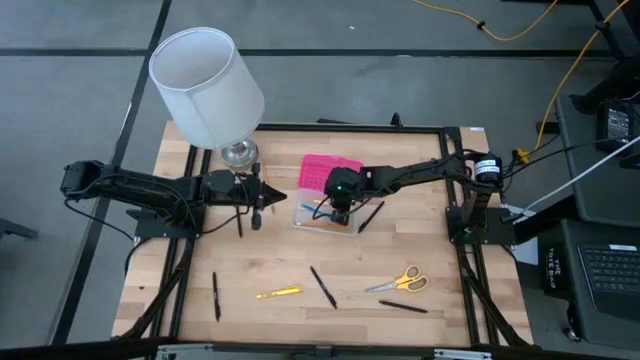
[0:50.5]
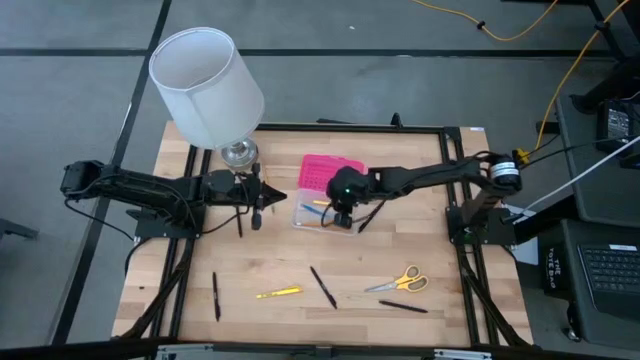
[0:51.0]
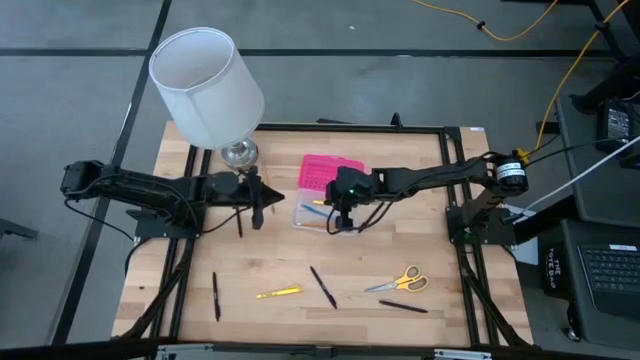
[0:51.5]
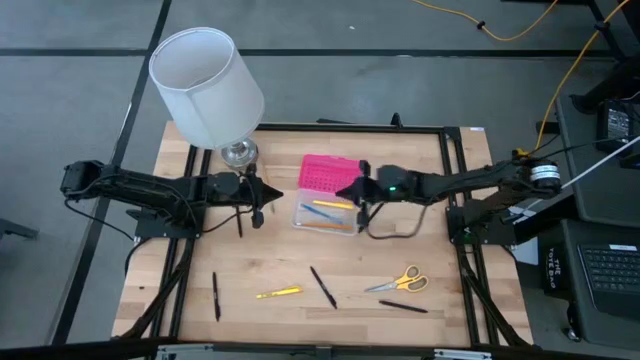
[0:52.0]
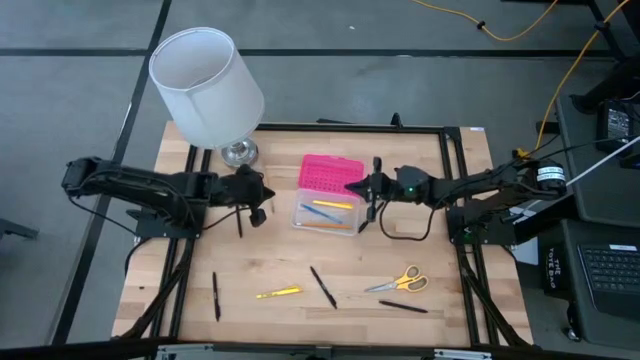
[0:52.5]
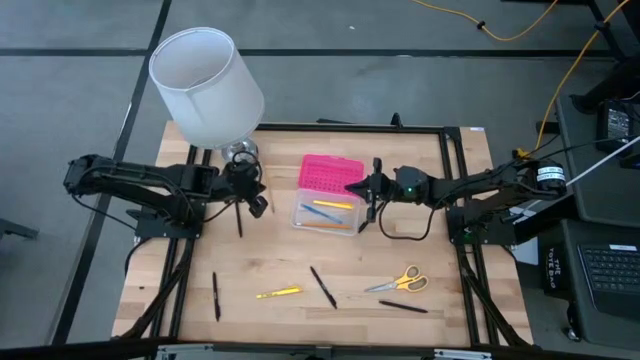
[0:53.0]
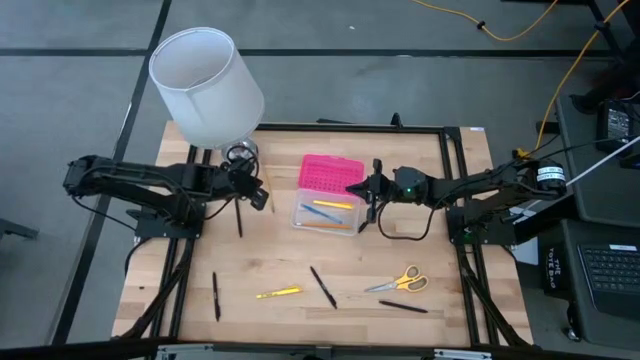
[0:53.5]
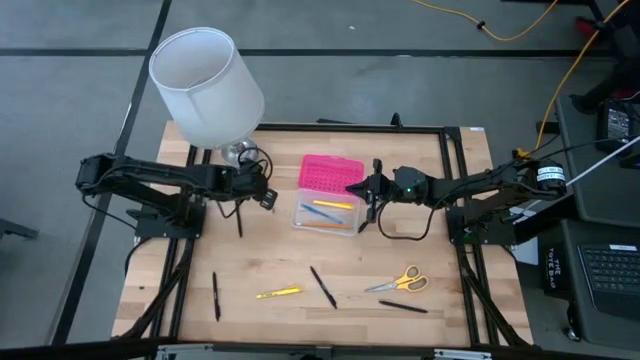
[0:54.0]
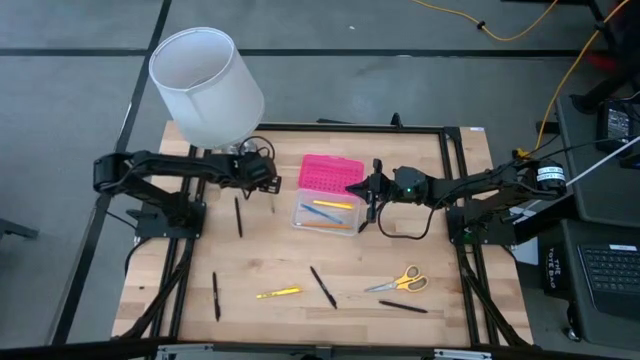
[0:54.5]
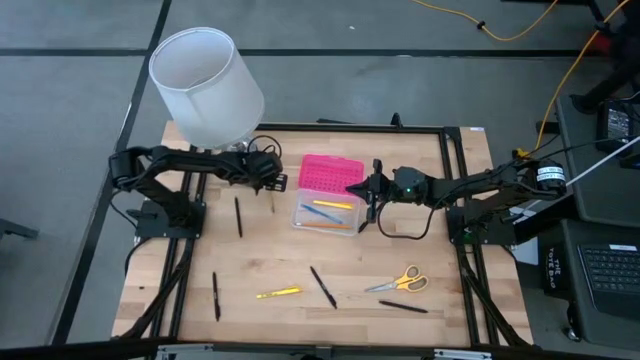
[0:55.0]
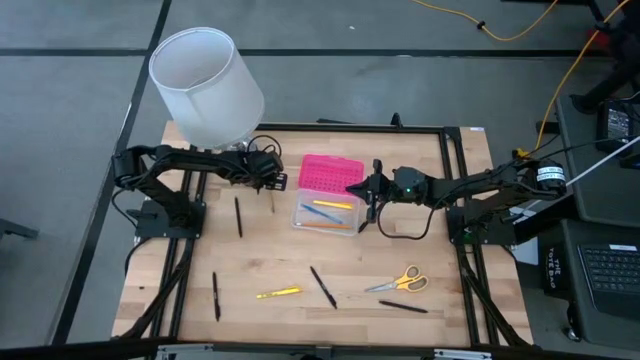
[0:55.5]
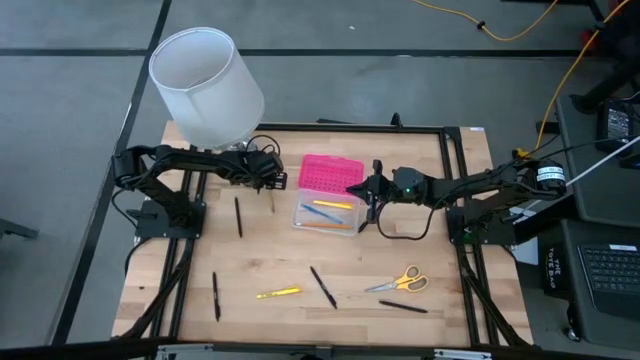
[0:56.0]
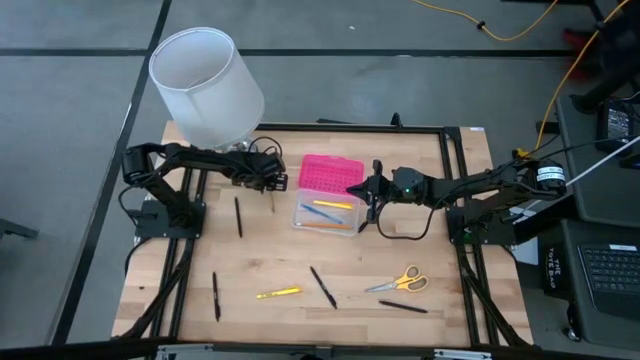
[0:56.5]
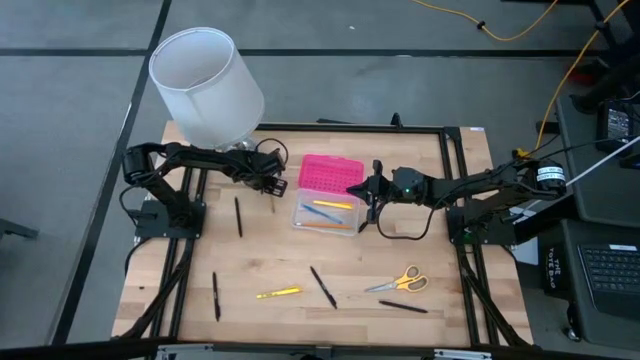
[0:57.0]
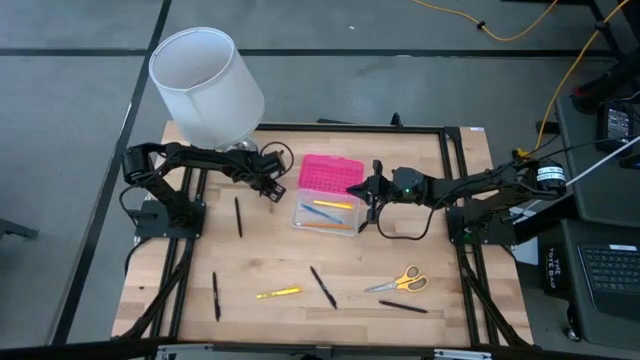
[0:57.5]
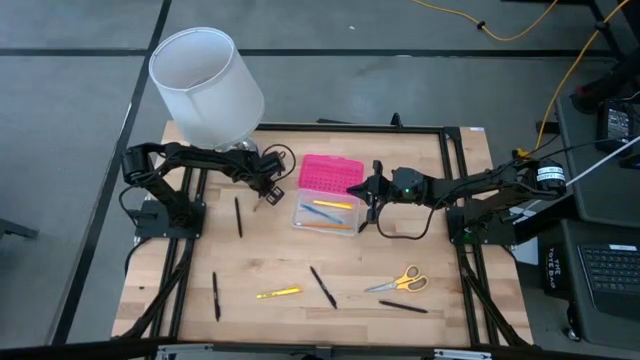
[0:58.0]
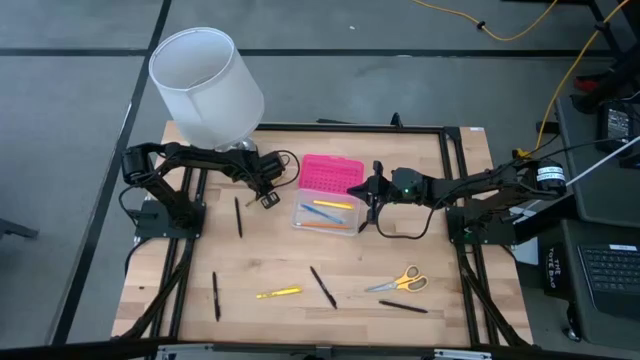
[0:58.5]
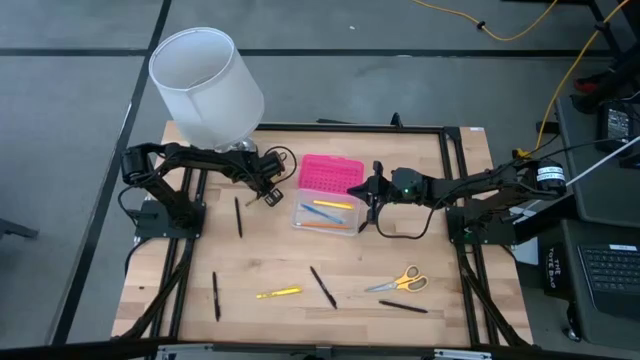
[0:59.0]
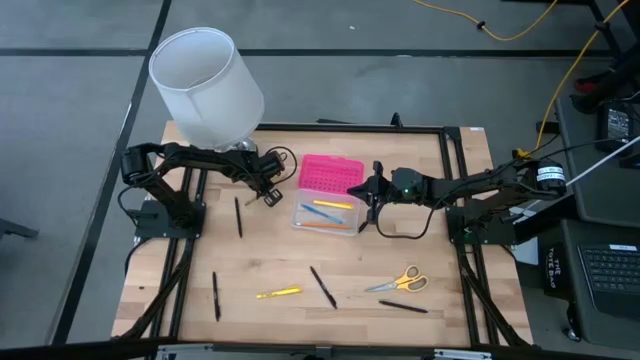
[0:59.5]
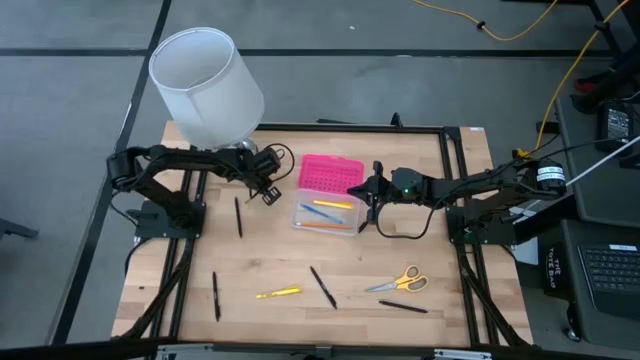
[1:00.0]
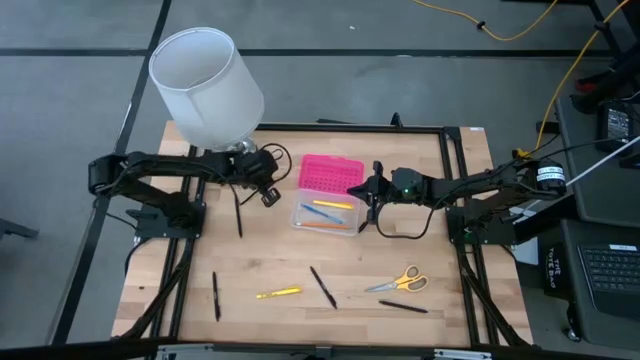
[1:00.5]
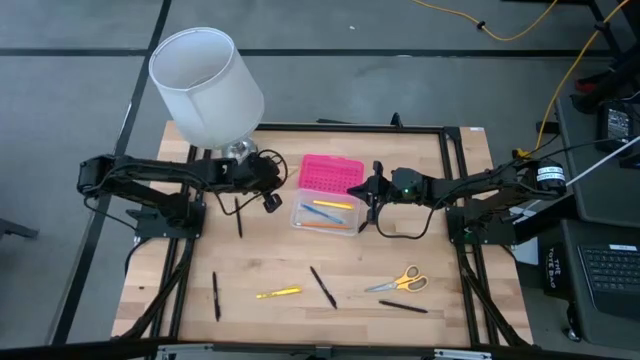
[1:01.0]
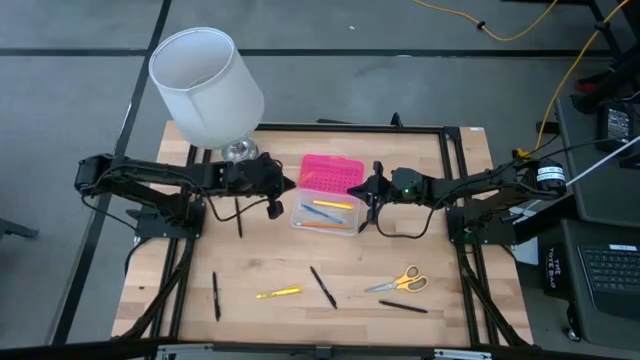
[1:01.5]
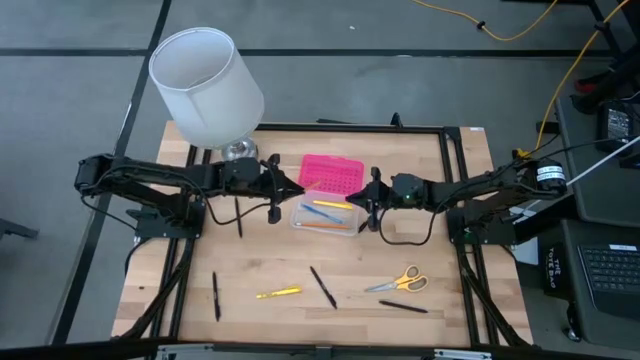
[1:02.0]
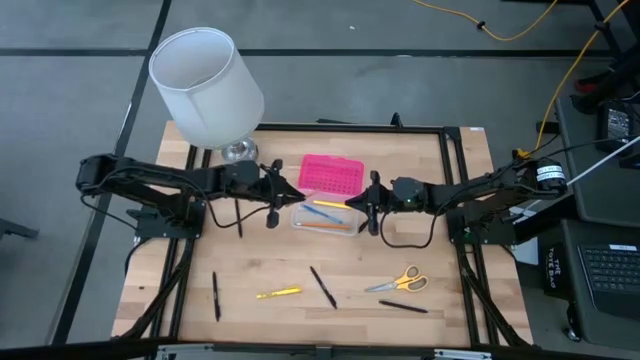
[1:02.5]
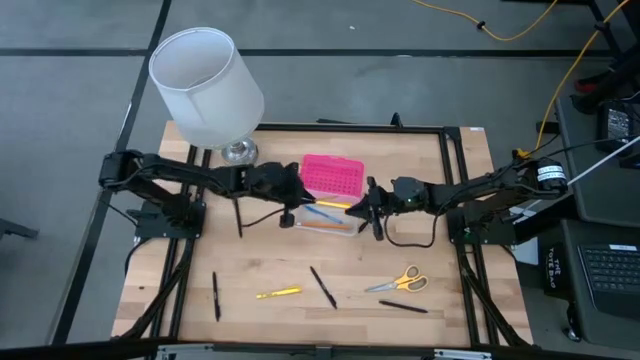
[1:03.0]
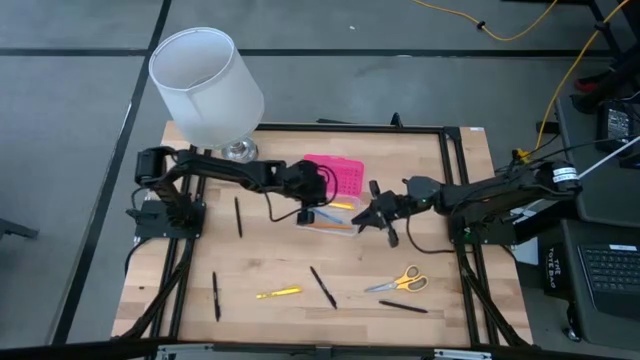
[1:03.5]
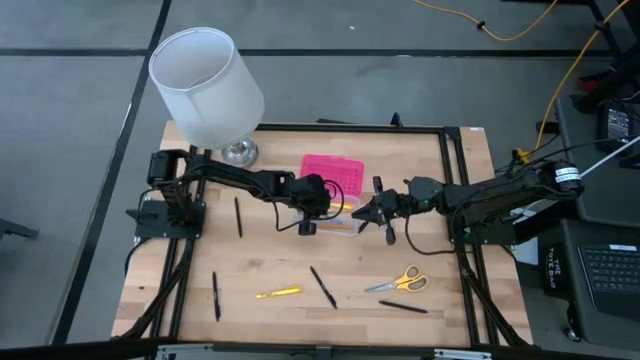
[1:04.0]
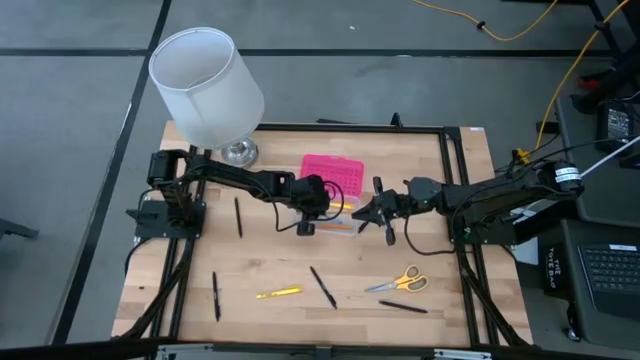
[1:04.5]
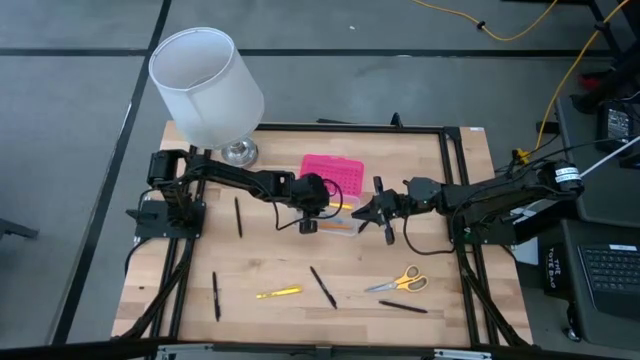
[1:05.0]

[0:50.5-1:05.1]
Task: Pick & place school supplies into a supply box
Put the yellow pencil into the transparent supply box

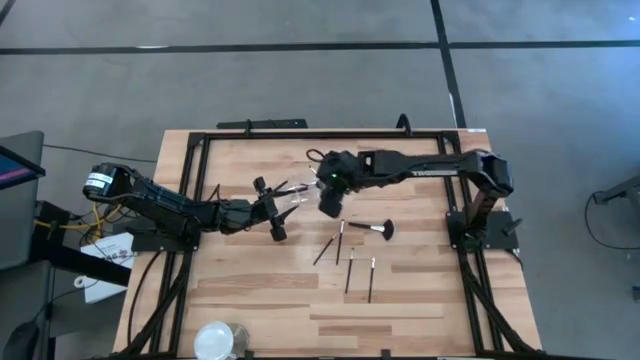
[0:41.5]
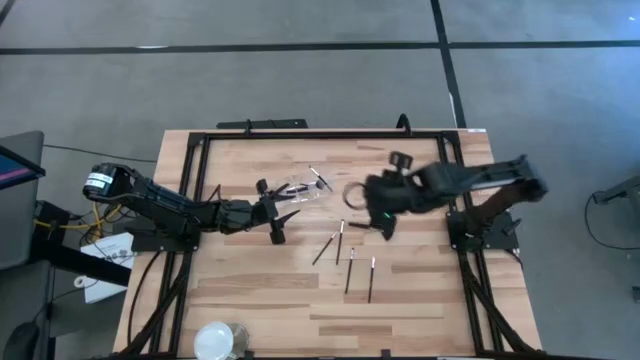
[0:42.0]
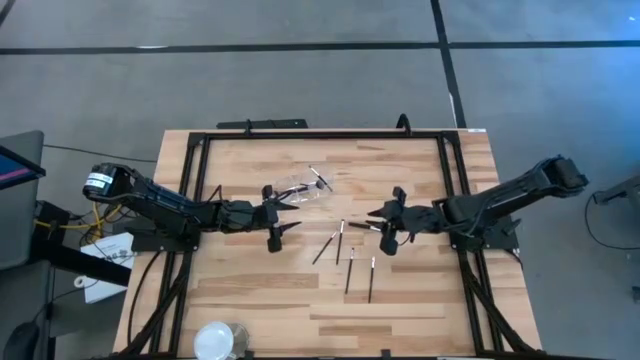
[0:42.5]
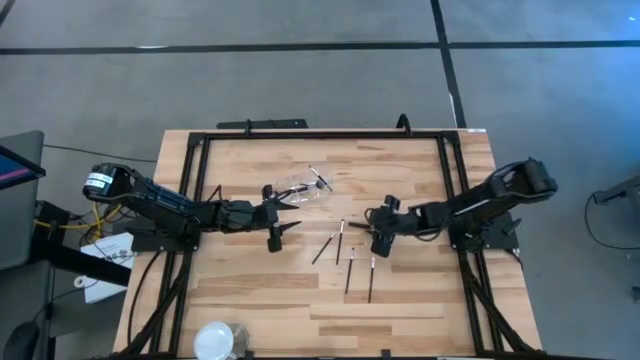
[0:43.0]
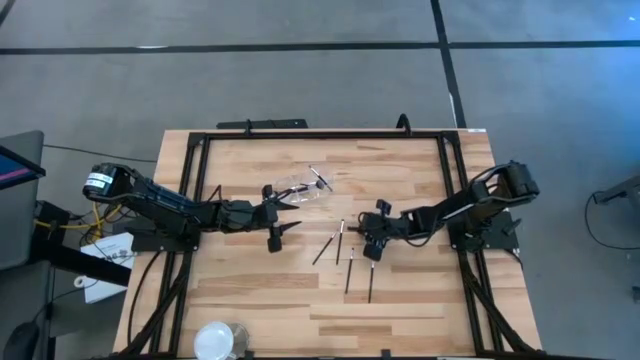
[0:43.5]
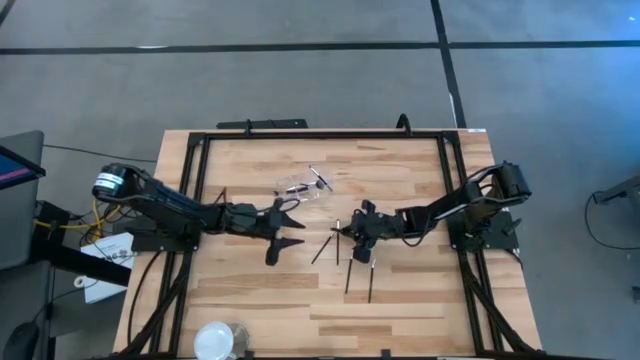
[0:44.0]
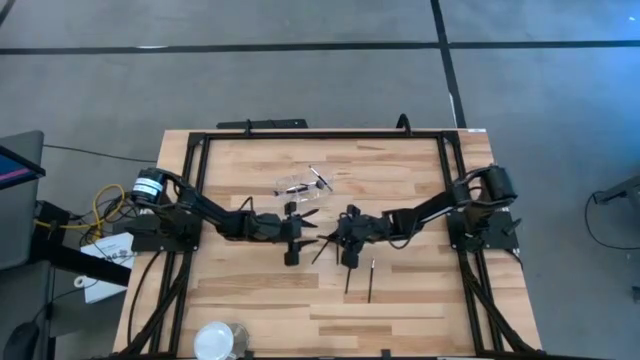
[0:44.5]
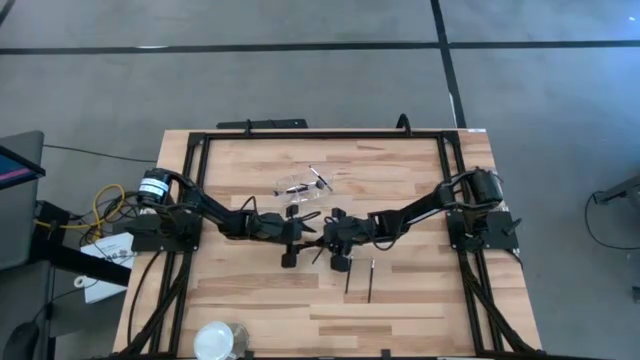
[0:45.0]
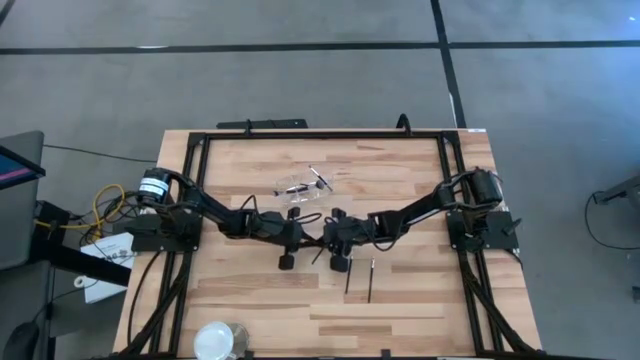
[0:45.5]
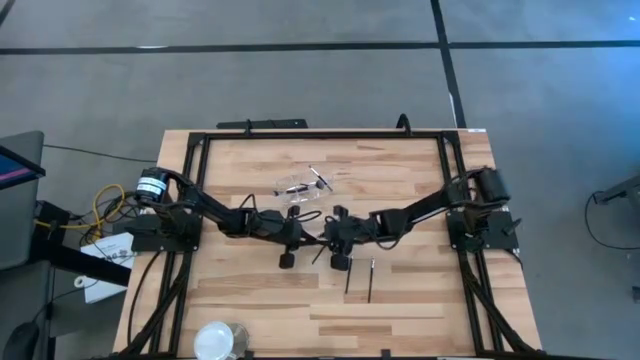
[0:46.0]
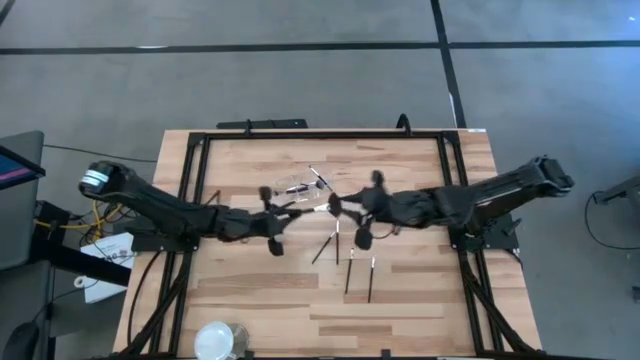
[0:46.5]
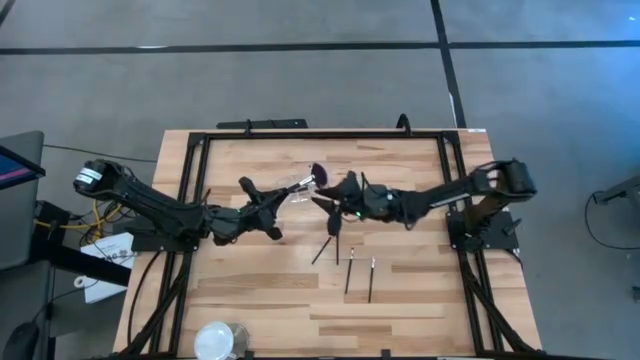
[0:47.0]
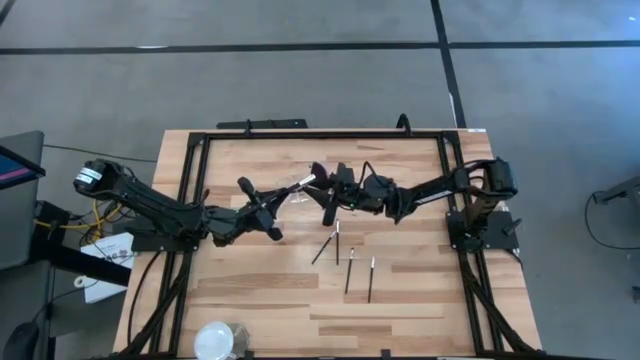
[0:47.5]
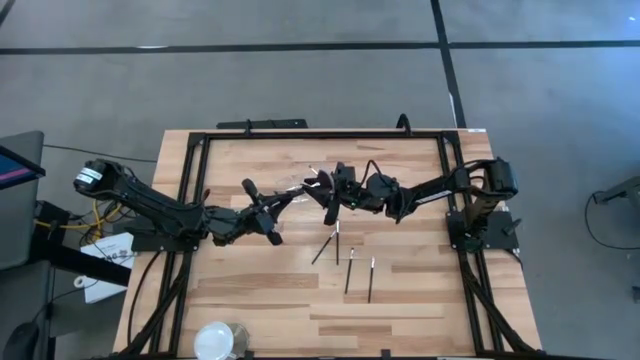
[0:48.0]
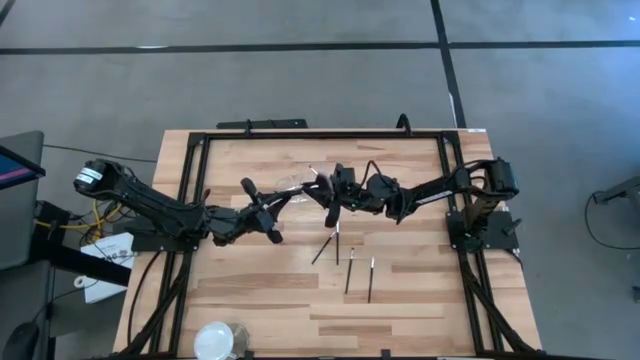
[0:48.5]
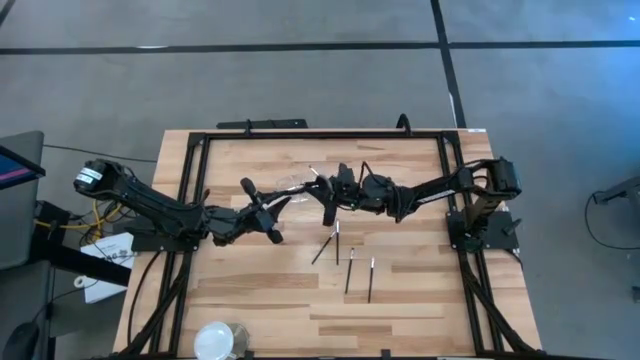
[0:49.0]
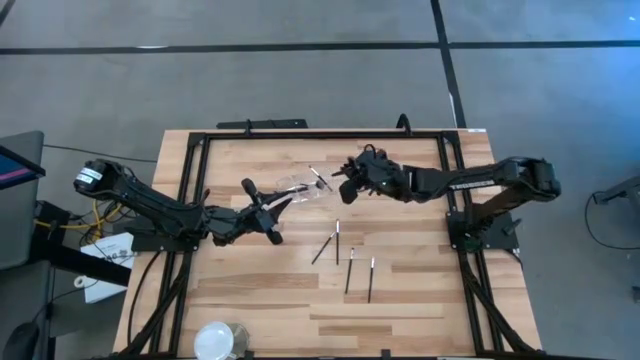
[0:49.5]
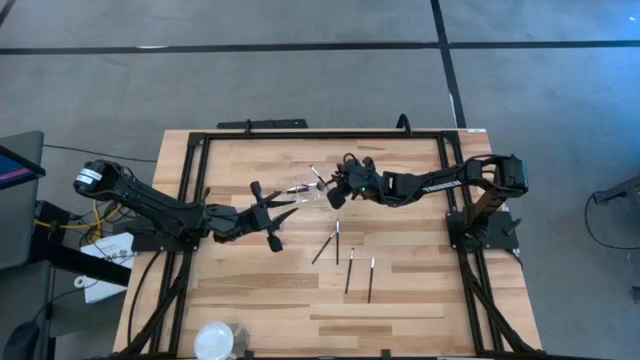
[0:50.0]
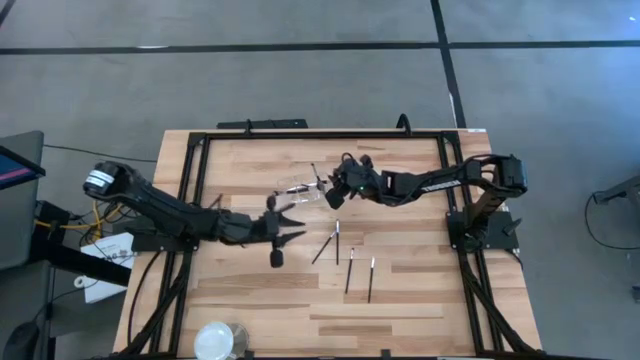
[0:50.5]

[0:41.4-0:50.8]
Task: Put items in baskets/containers
Put the black highlighter brush into the transparent organizer
